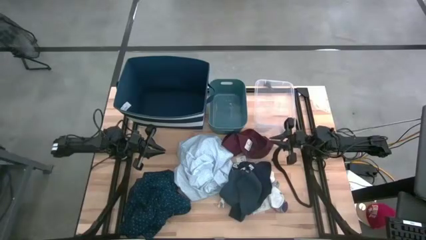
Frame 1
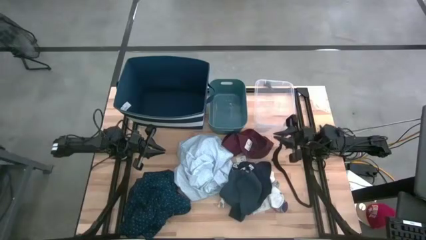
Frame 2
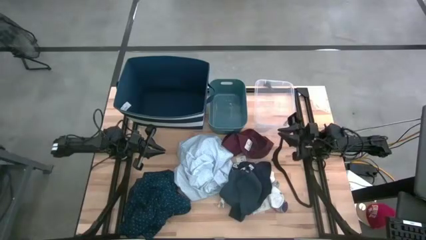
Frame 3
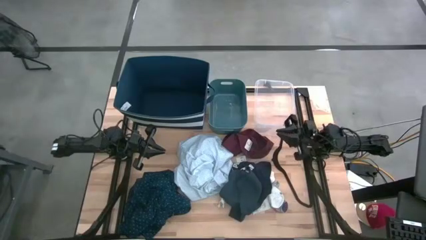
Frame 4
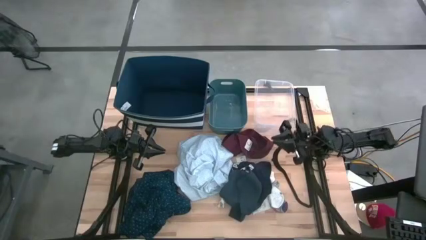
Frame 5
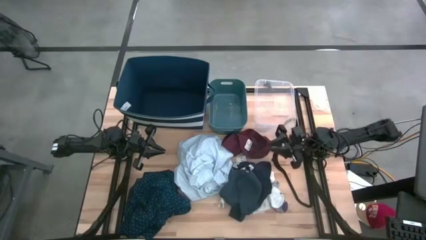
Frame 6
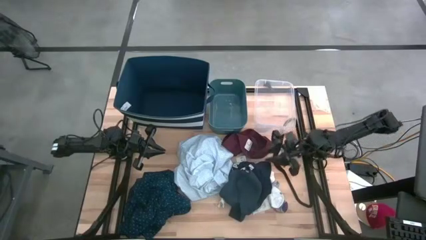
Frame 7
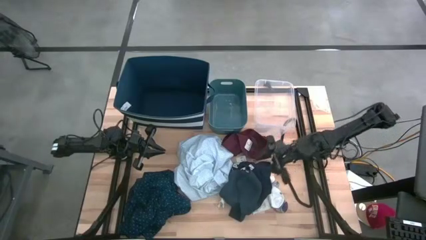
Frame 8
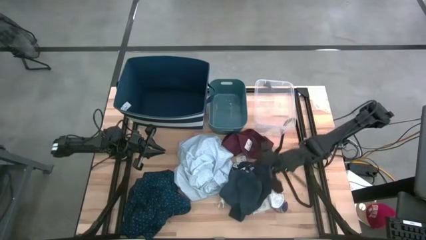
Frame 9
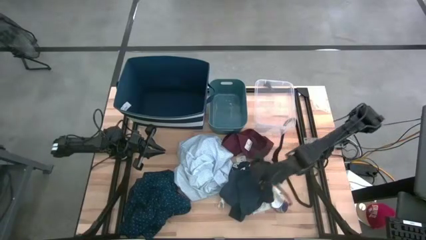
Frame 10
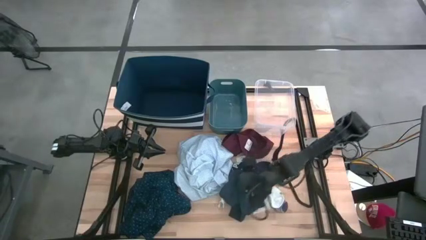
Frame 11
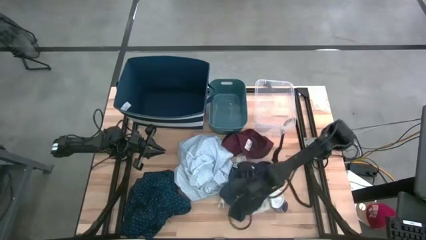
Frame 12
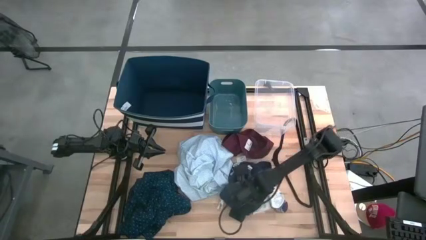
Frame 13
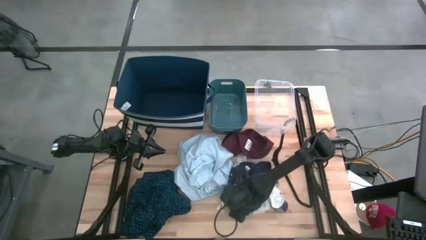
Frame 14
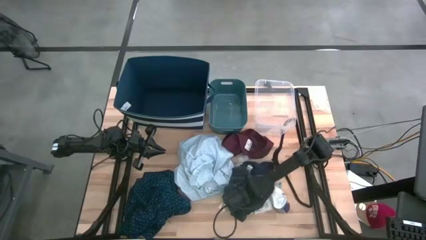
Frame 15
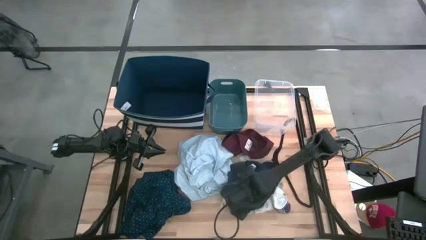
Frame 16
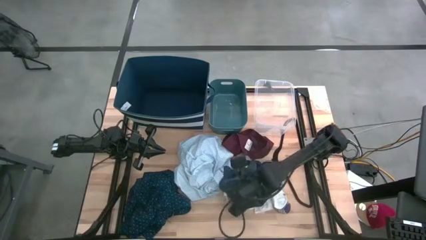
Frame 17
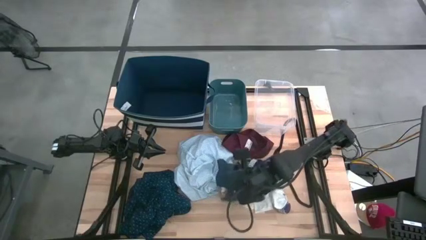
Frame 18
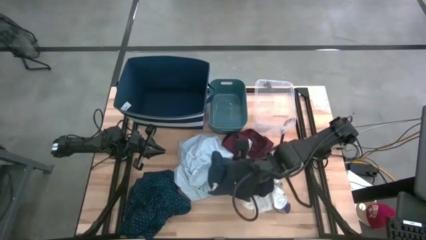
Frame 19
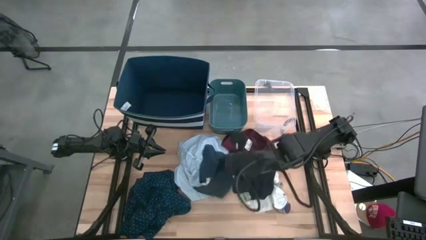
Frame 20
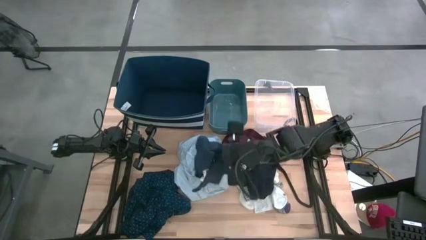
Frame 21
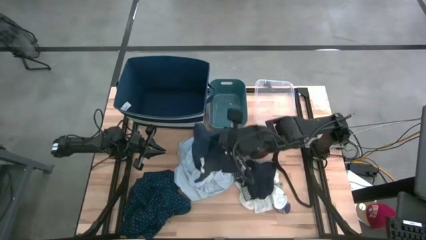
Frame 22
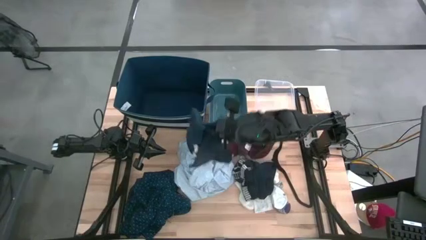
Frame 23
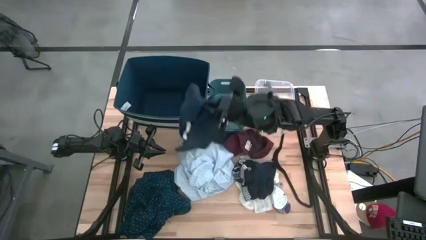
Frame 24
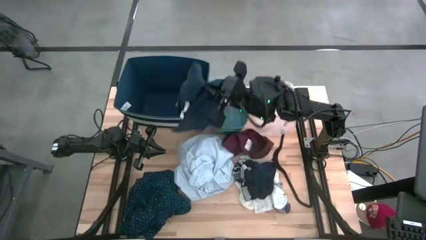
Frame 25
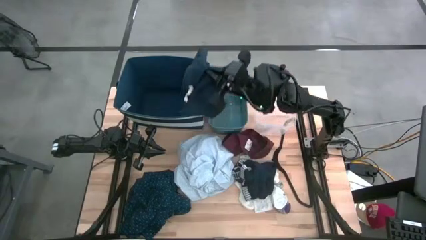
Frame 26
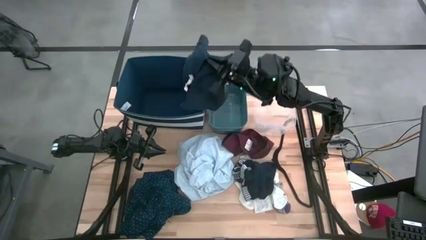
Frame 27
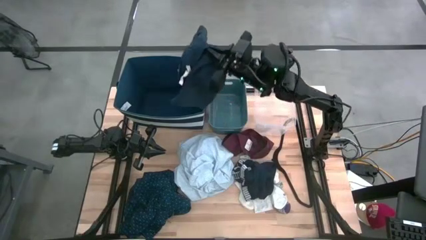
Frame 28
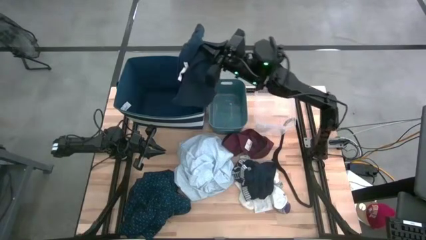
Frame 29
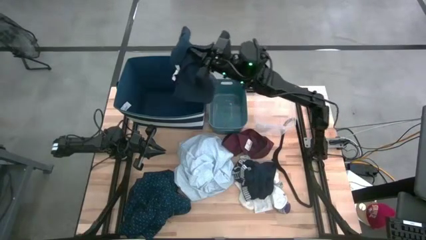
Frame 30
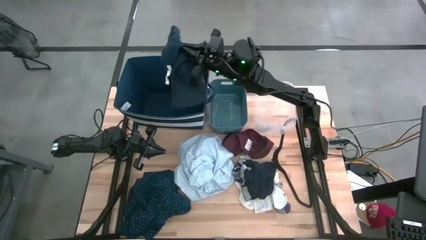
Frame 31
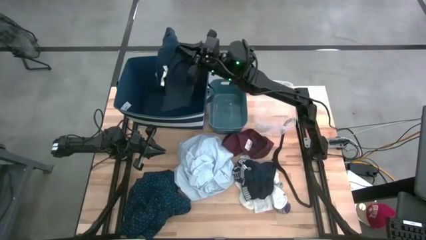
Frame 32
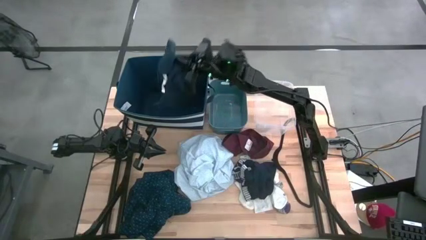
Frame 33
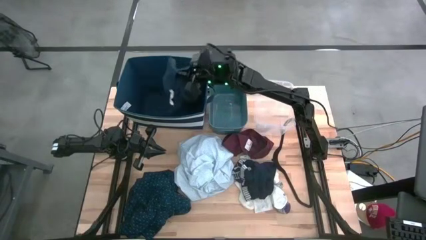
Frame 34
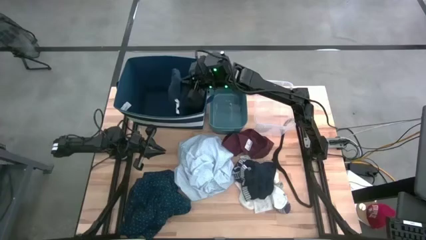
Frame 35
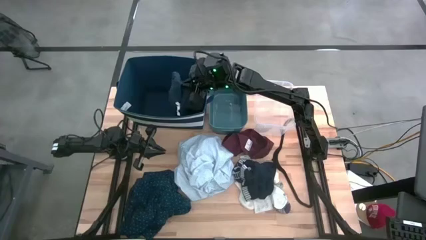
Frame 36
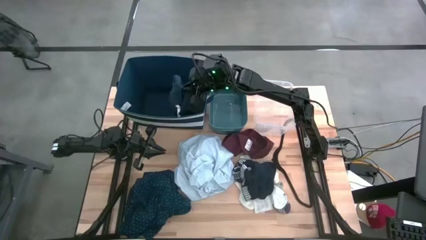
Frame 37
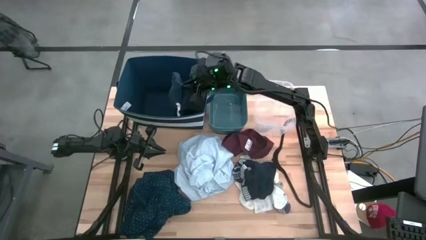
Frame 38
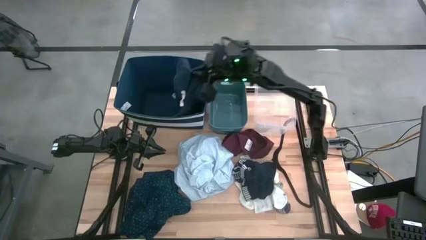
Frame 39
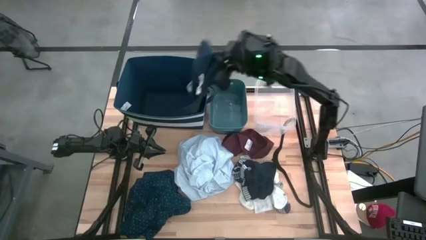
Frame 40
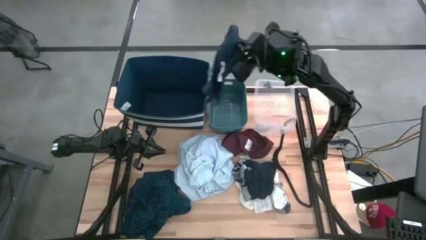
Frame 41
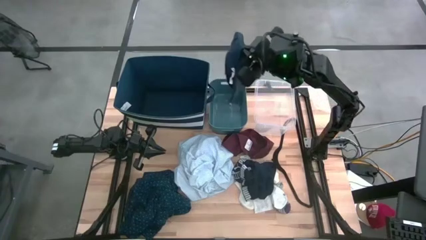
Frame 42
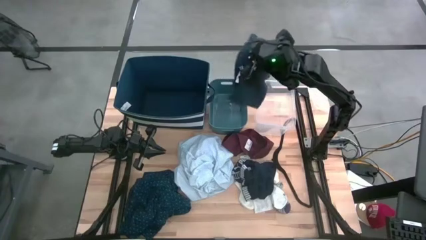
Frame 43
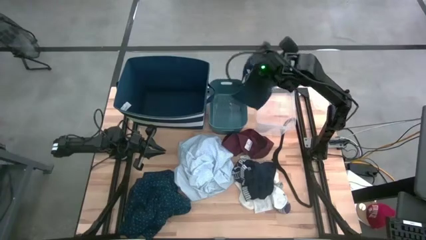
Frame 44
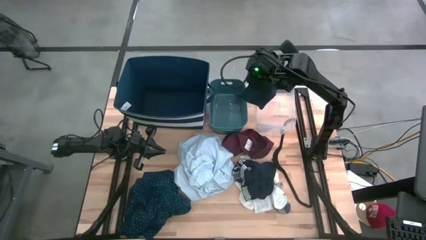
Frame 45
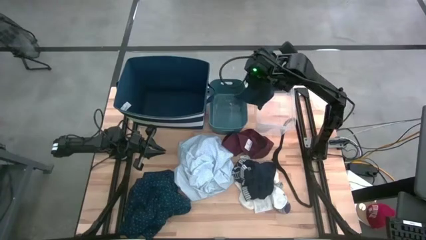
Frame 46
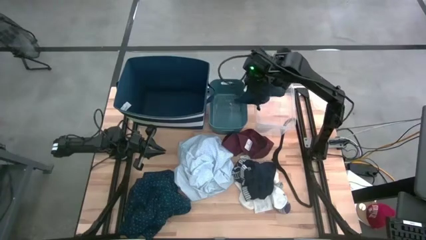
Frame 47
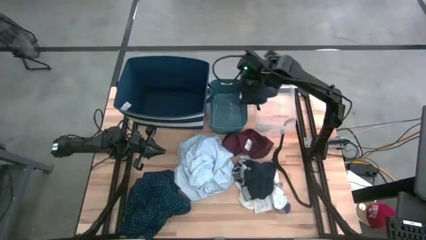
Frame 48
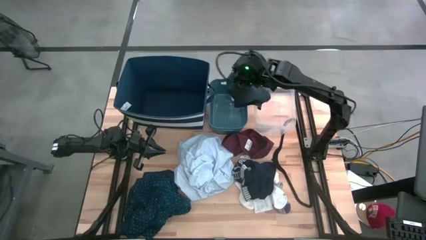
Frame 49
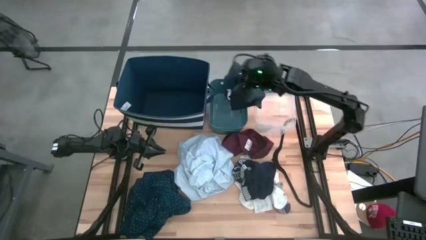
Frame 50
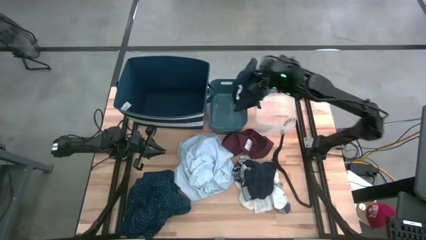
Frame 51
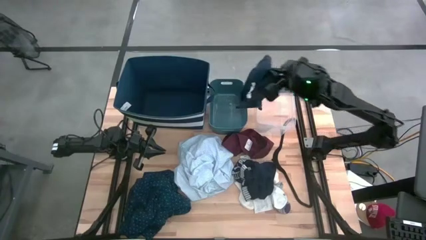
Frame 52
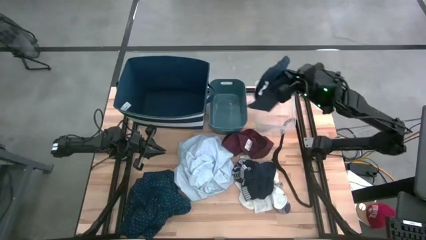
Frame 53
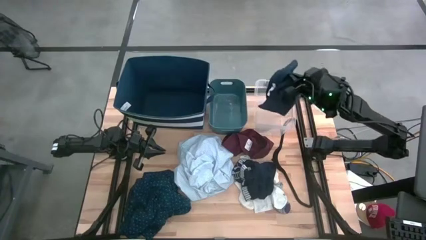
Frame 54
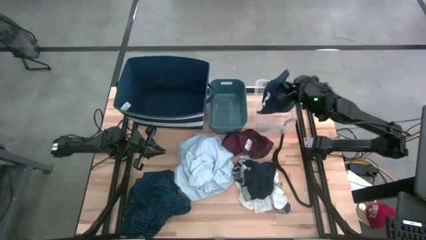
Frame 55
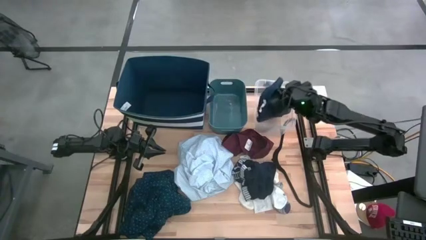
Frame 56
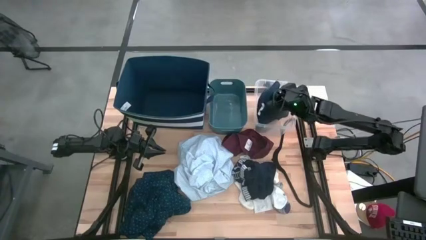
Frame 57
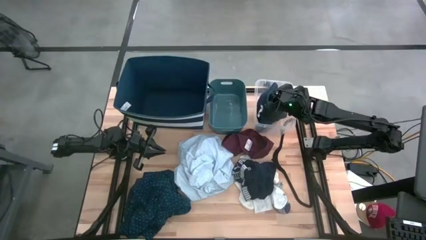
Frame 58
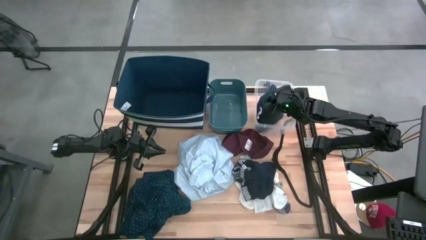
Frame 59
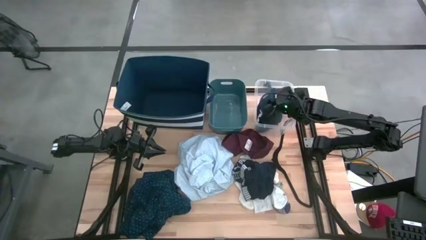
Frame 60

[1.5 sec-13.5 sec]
Task: Pick & Place Cloths
Put the dark gray shorts into the transparent bin

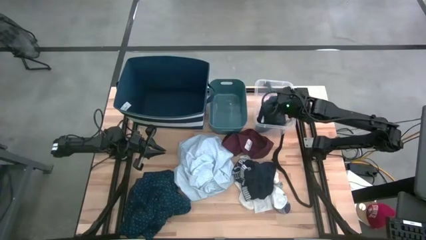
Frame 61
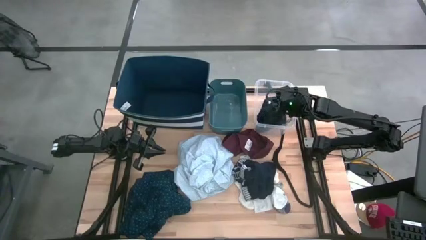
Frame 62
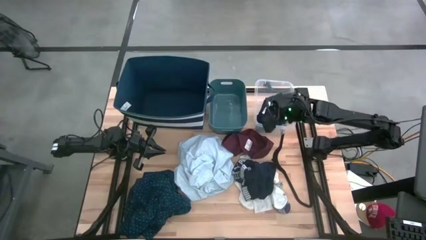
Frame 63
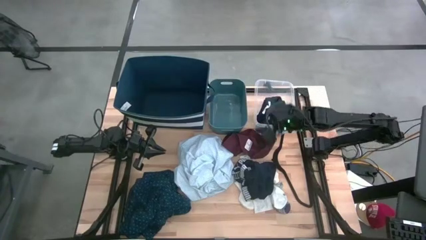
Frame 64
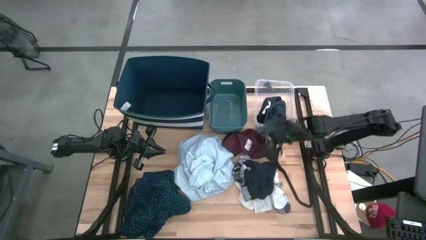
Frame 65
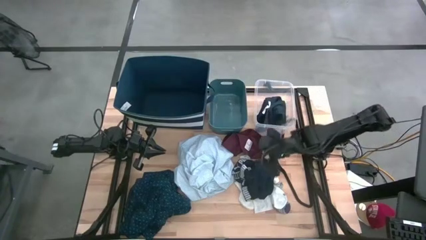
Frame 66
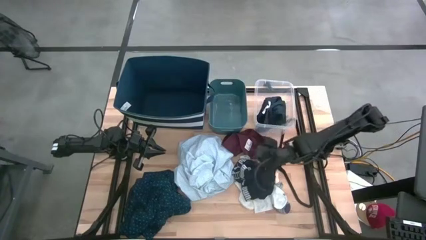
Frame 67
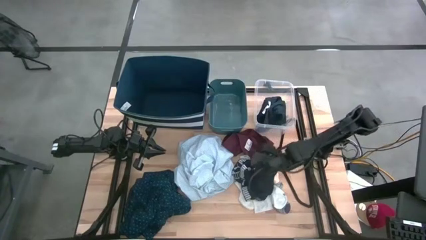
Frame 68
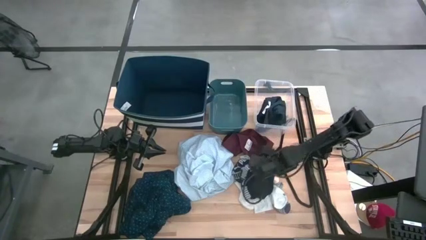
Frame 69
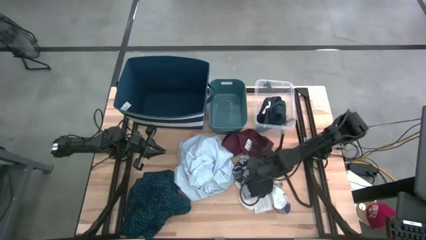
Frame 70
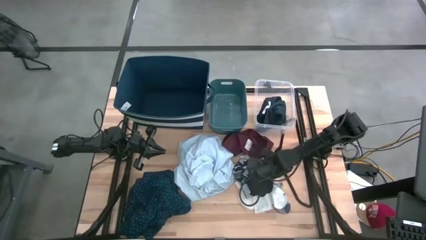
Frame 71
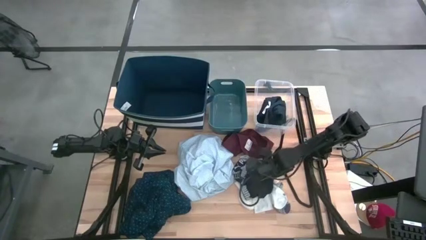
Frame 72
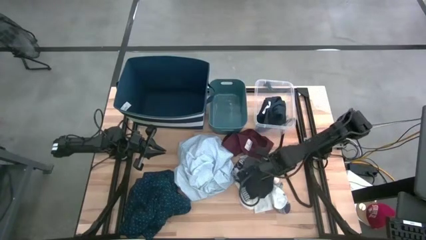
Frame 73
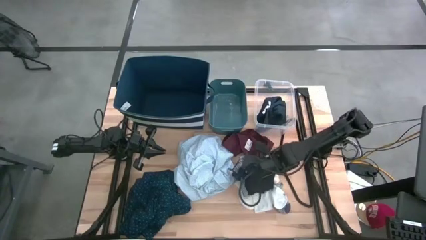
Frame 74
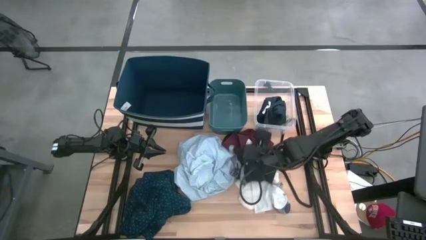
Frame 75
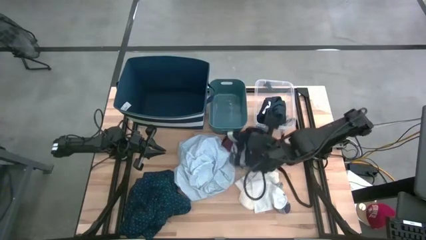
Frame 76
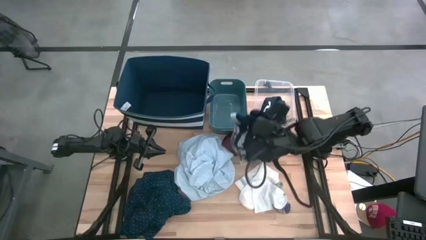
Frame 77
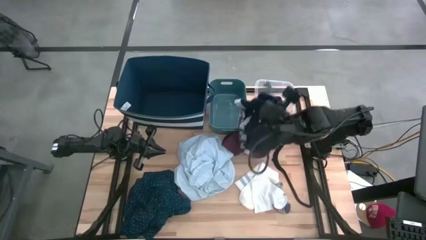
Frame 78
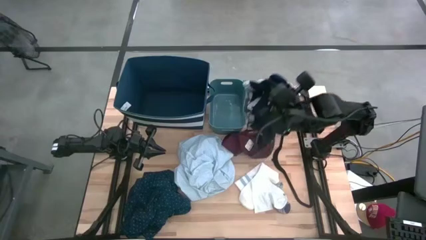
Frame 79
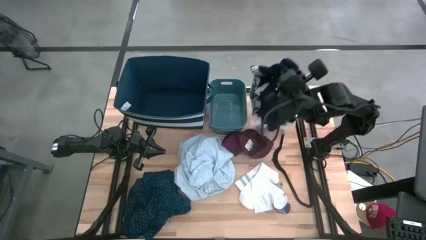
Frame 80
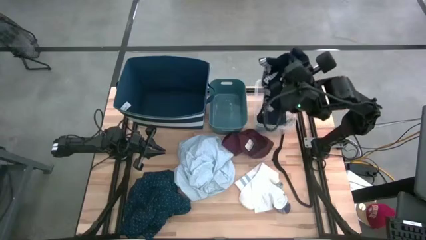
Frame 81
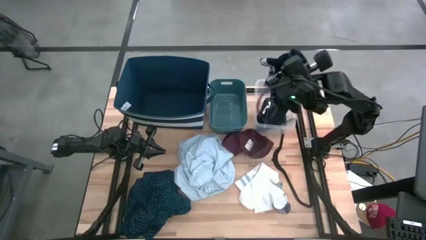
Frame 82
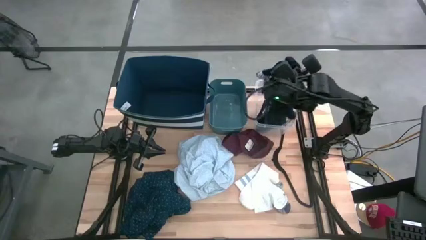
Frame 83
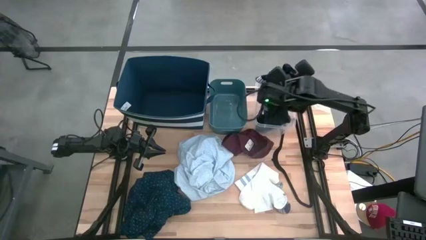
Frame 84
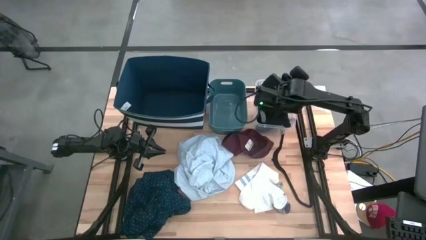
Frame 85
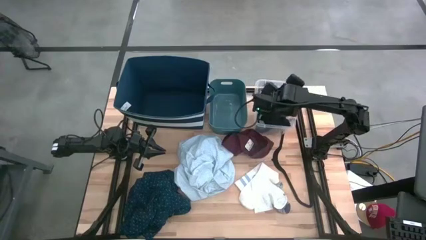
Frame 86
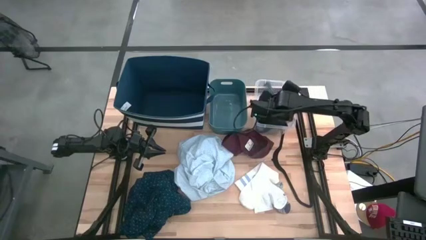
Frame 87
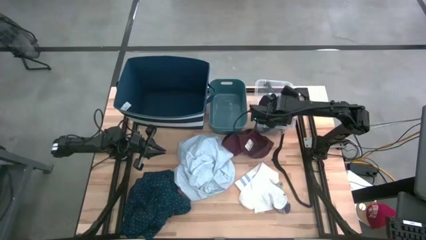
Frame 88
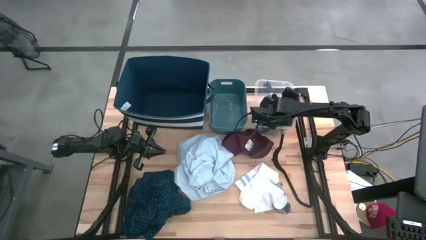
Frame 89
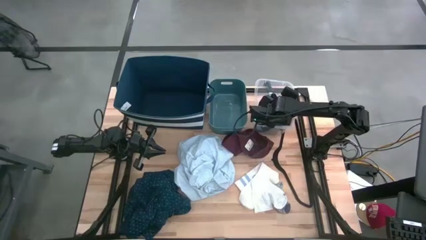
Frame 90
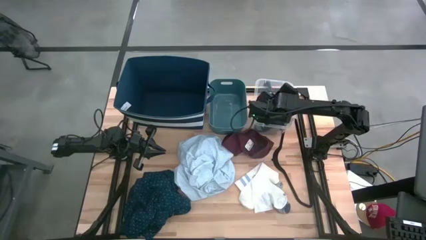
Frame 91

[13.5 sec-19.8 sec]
Put the dark blue underwear into the transparent bin
